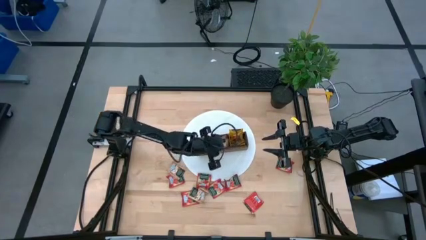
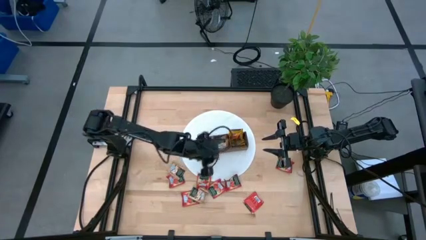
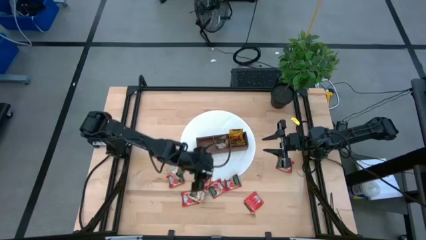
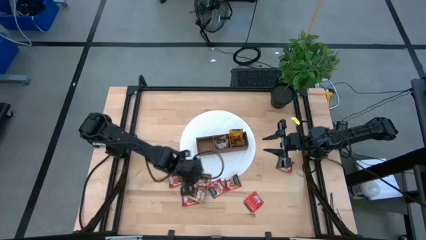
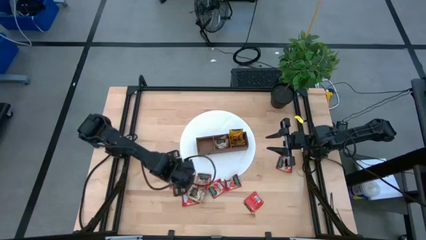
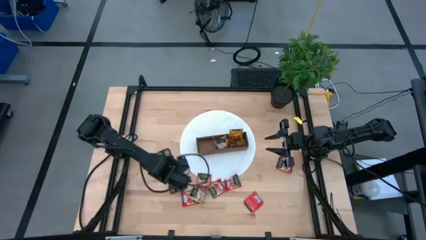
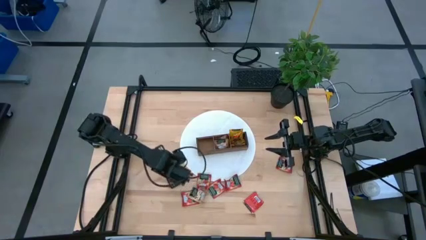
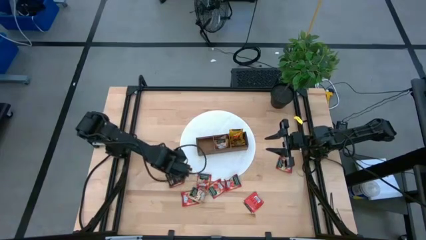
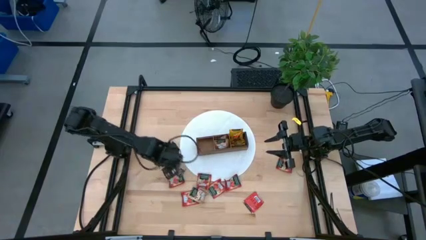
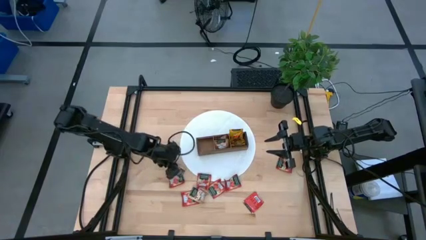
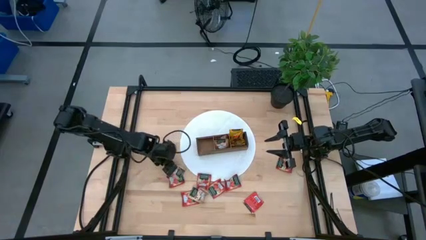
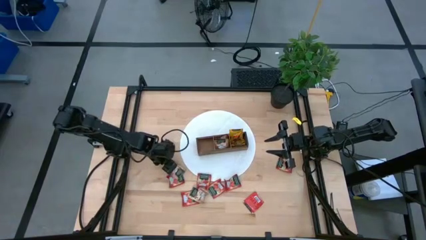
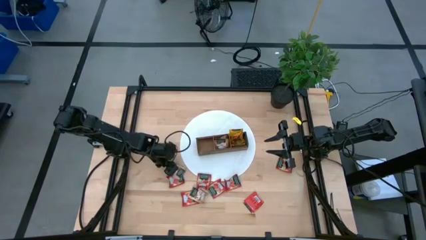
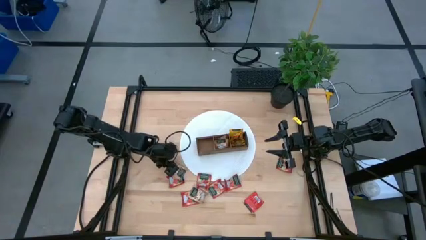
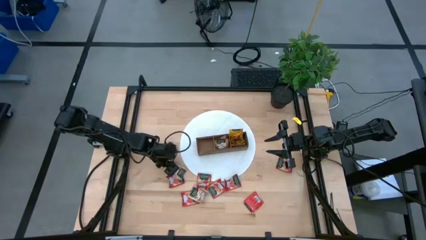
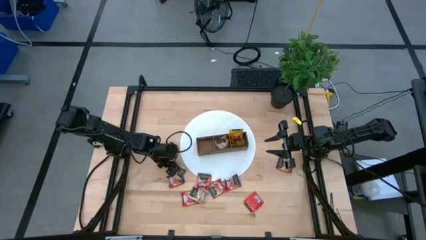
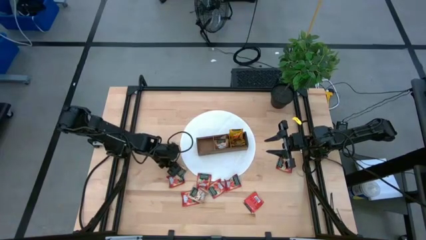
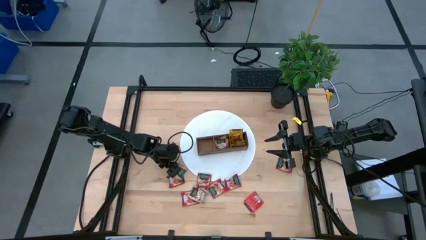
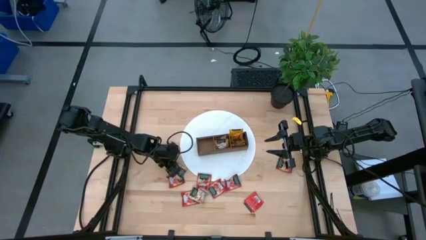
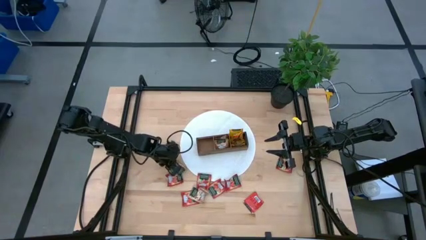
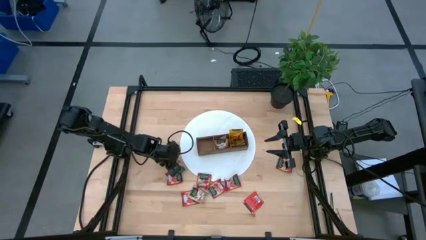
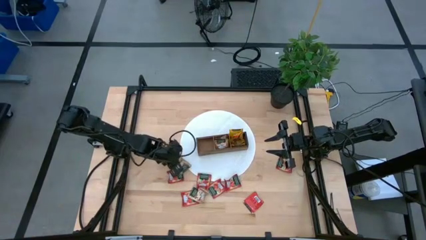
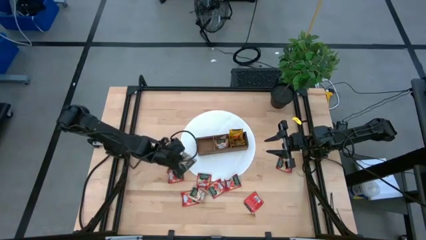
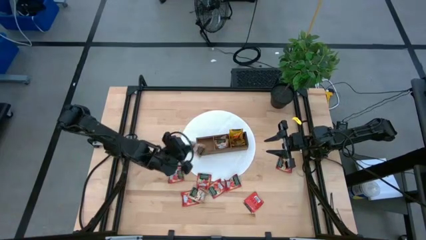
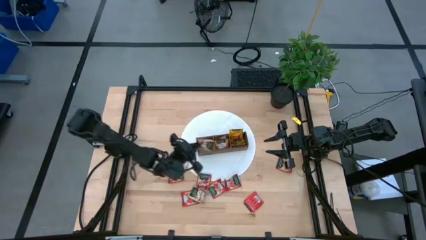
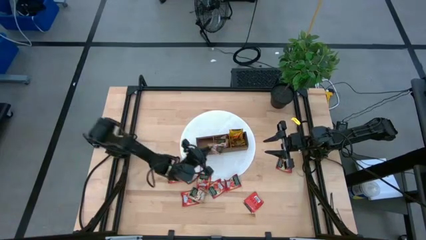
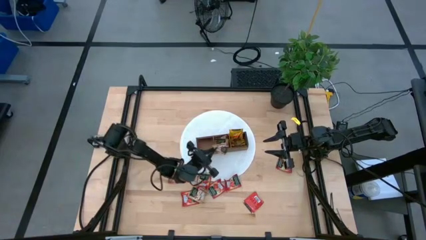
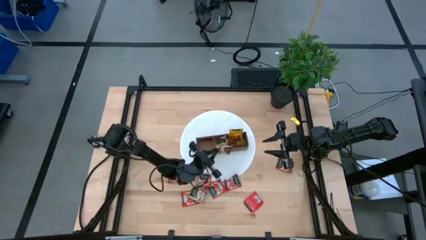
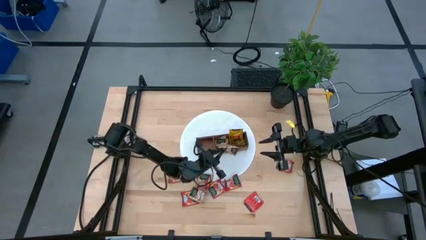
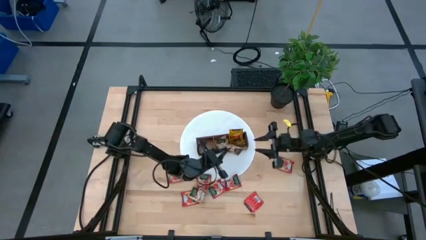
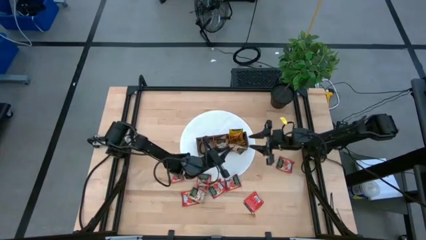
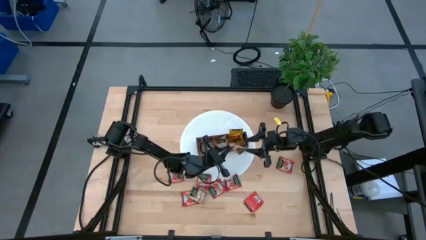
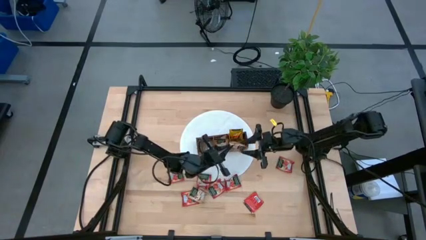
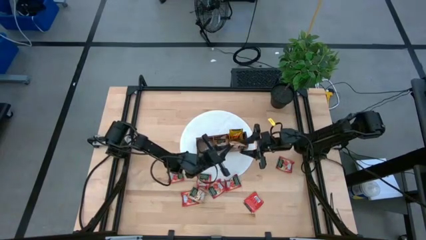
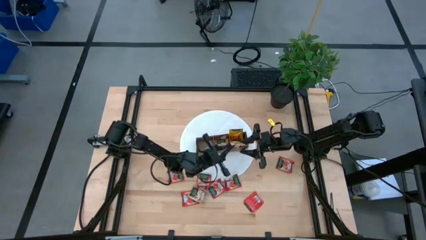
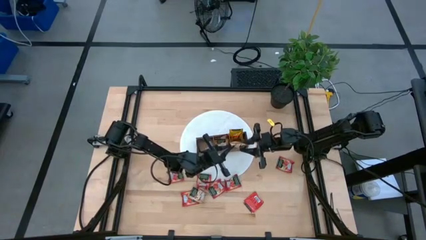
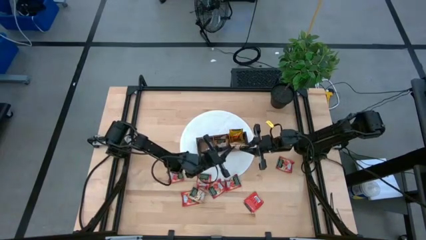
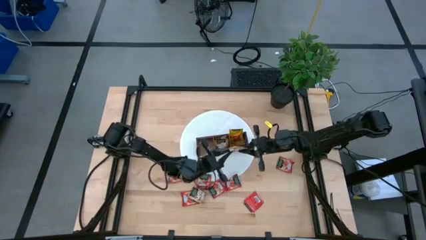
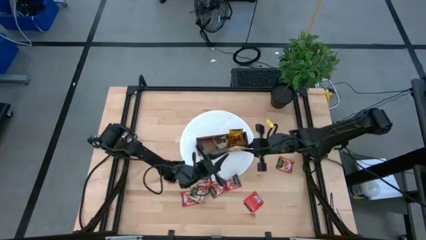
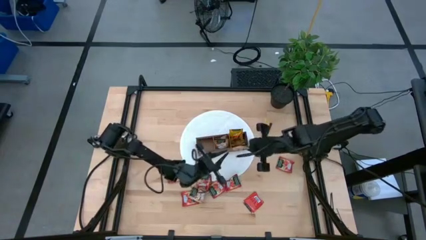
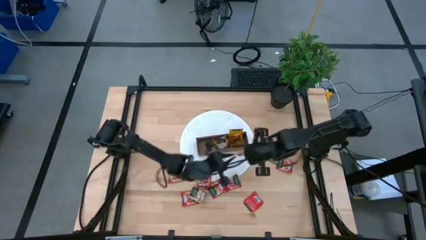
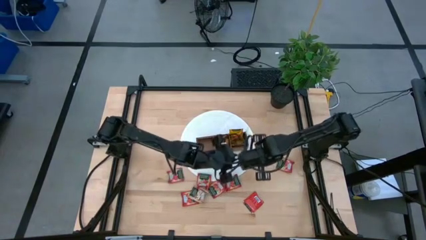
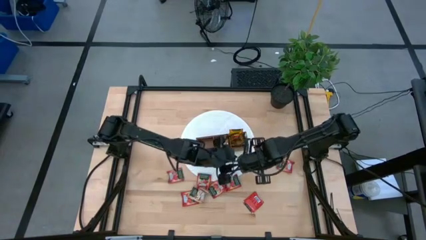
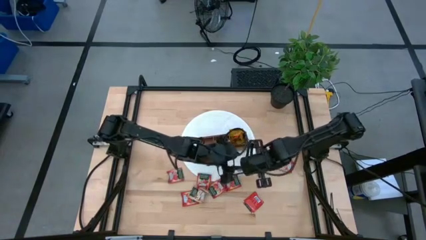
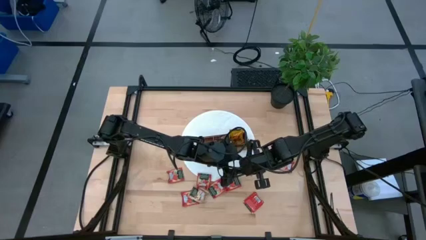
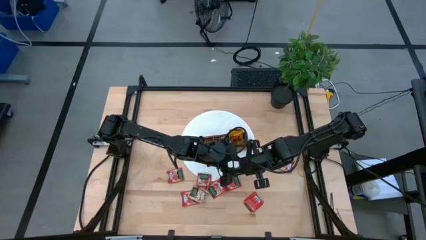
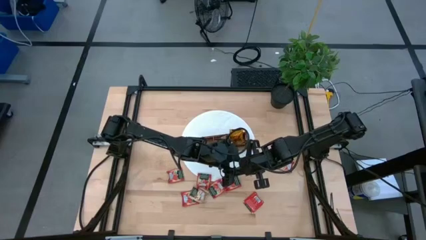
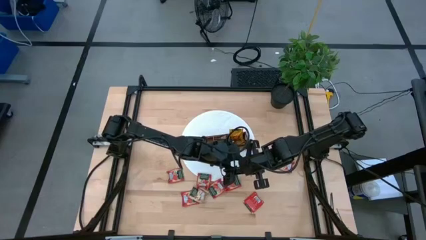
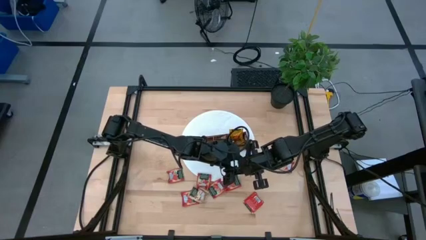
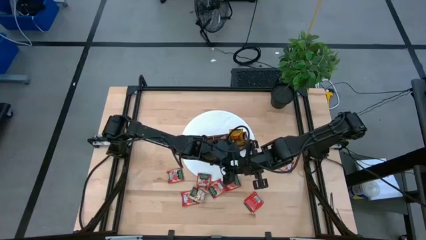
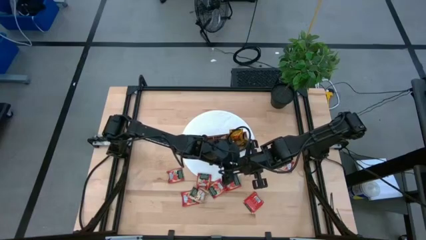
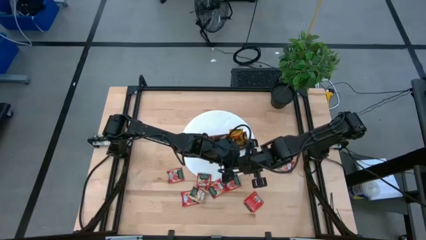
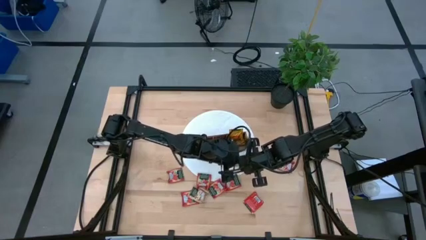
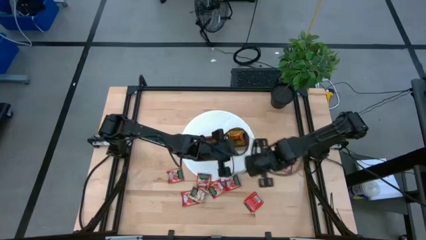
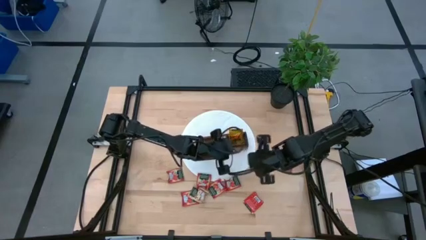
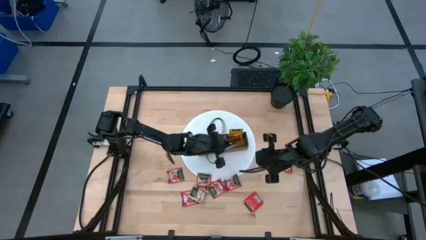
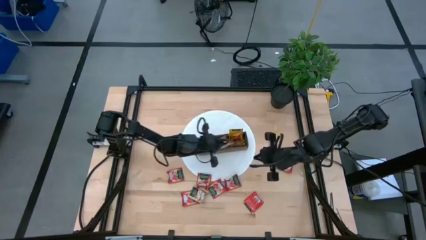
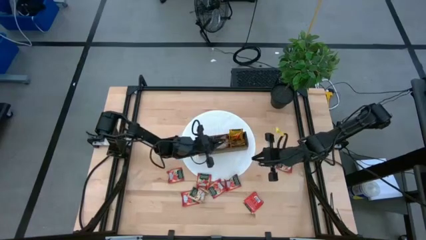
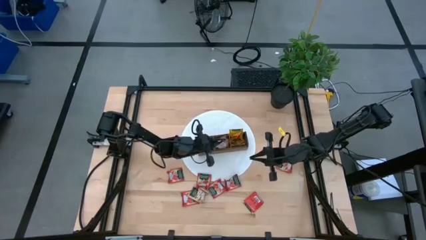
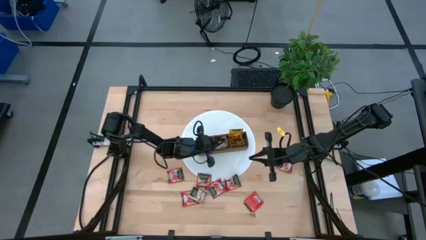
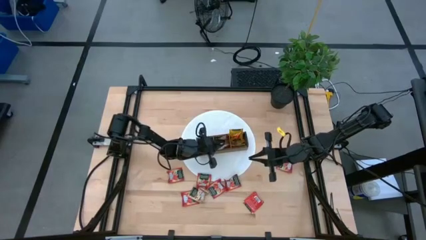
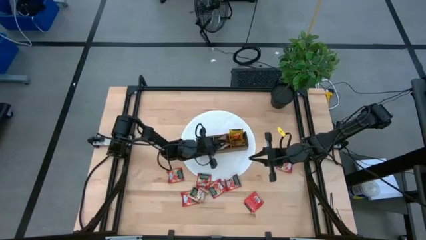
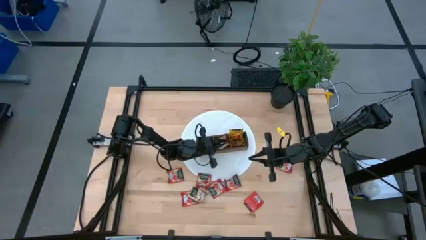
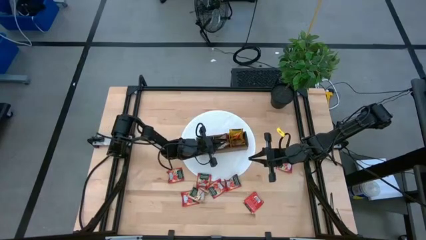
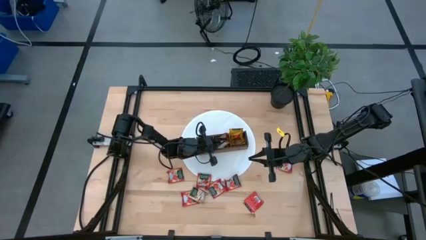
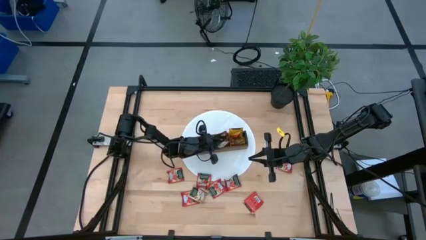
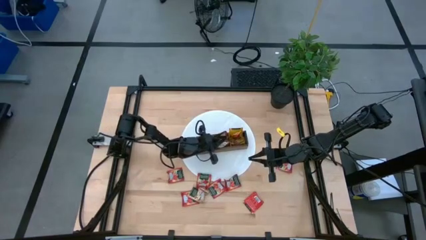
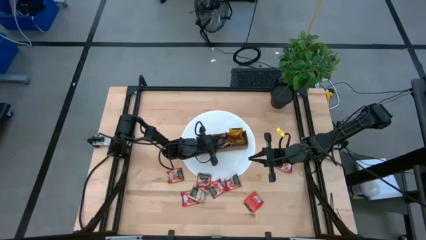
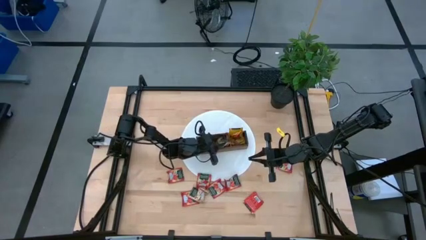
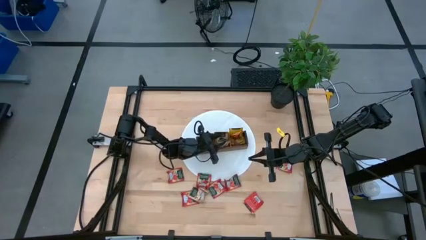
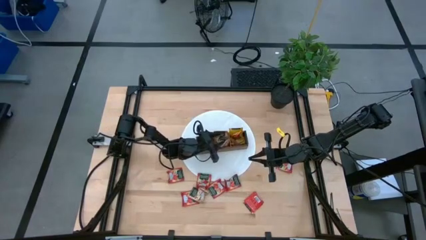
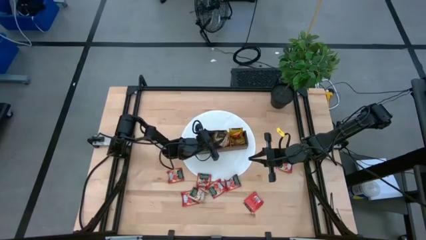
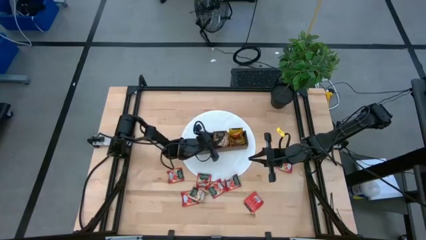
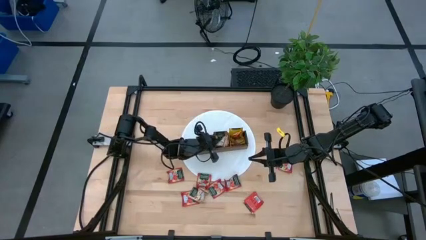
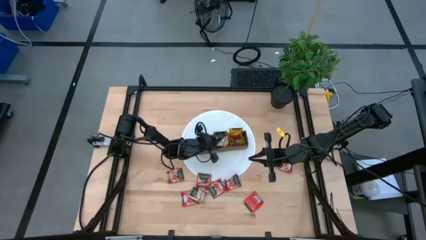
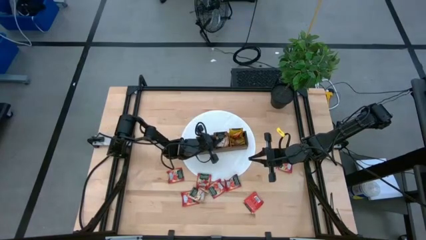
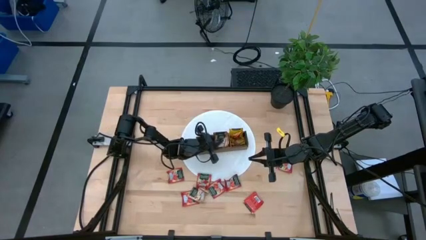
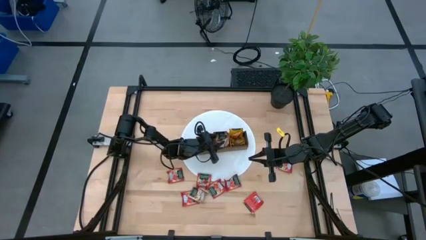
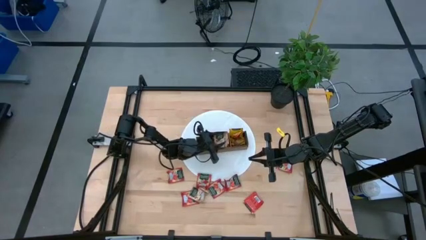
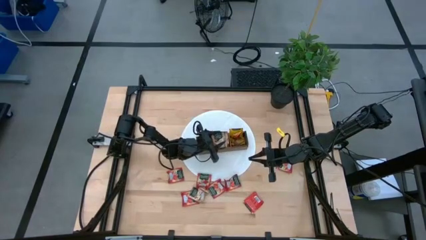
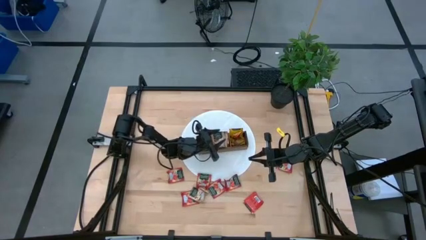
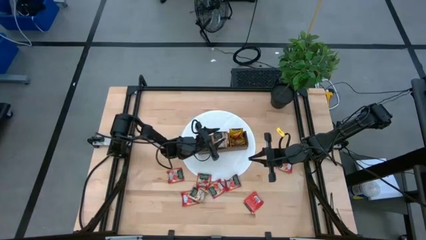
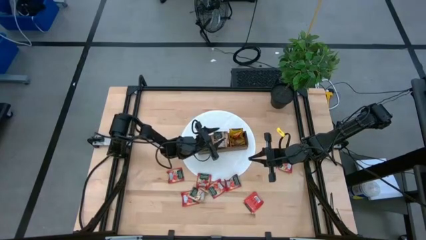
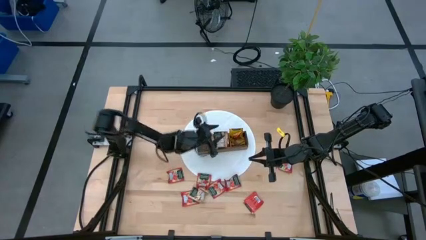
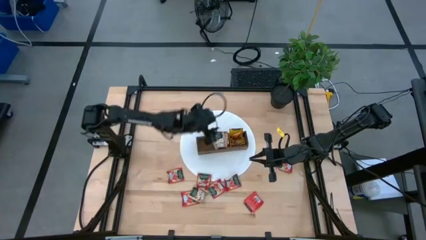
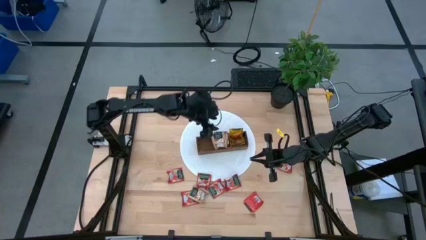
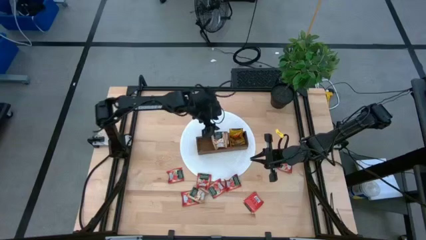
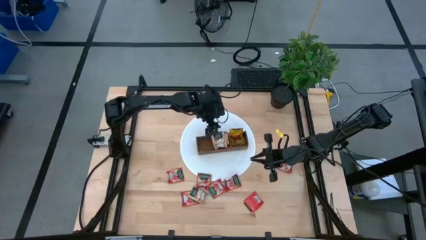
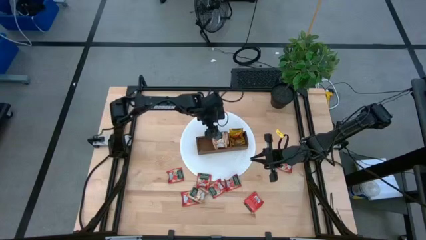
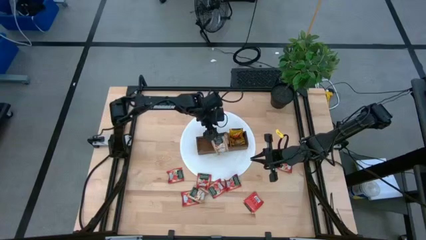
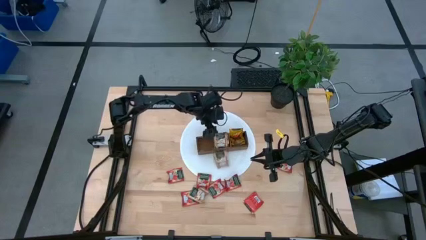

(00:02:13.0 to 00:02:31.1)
Task: Pick & Place Tea
Put the brown tea bag into the middle section of the wooden organizer
